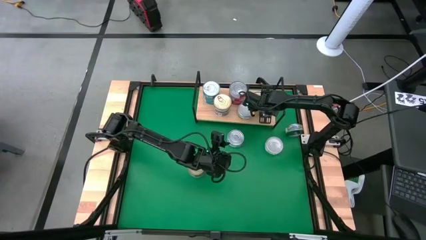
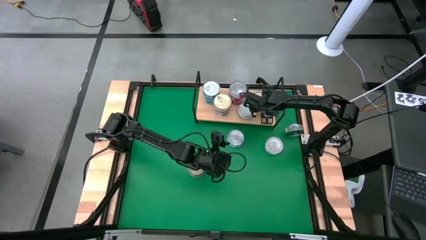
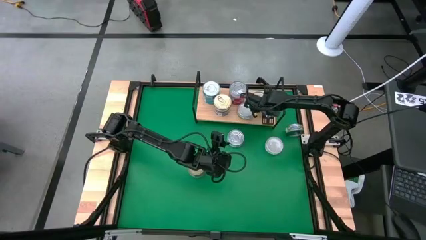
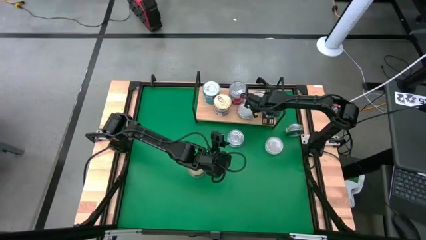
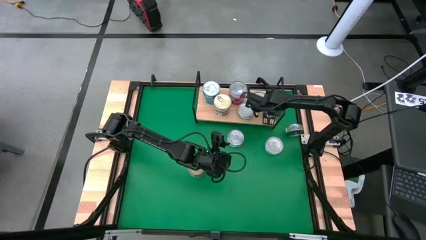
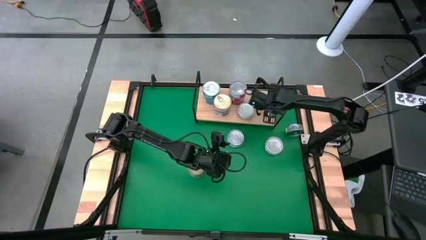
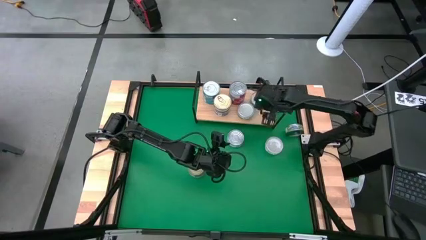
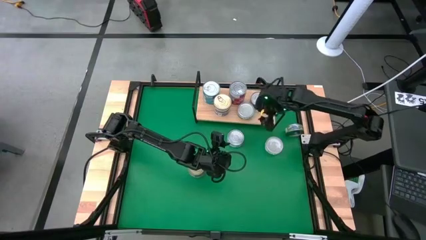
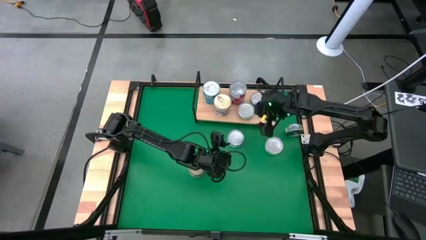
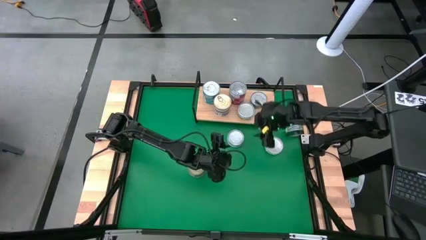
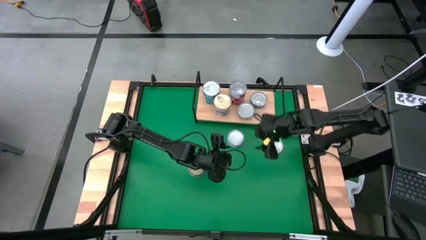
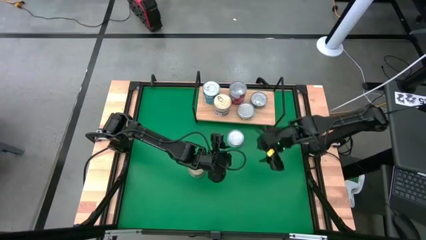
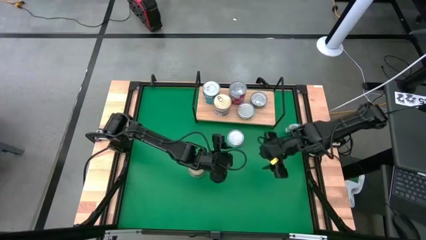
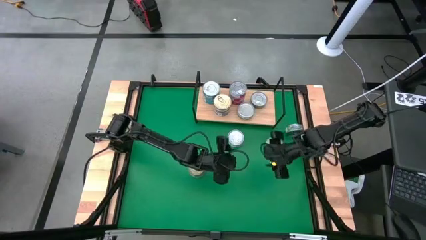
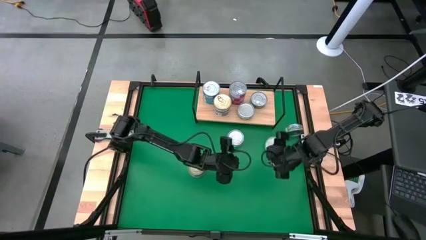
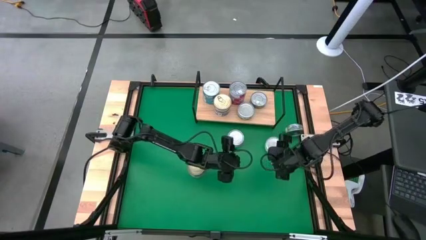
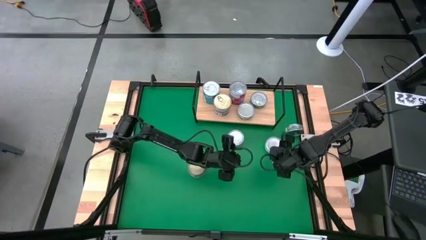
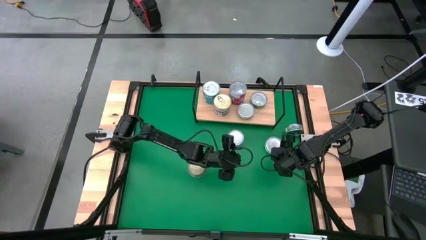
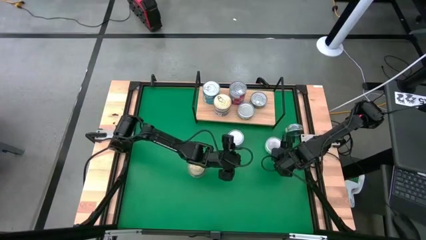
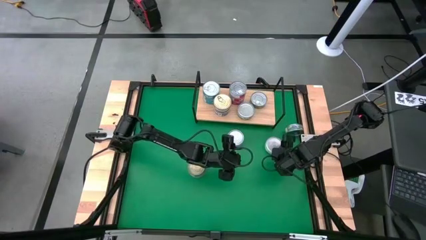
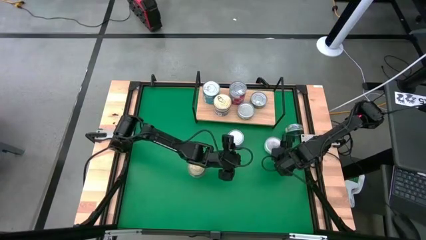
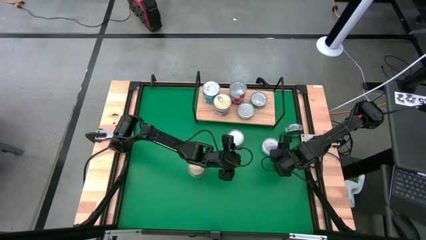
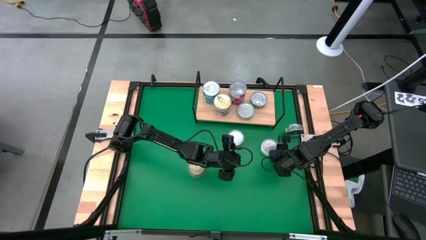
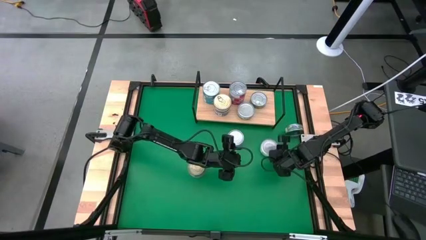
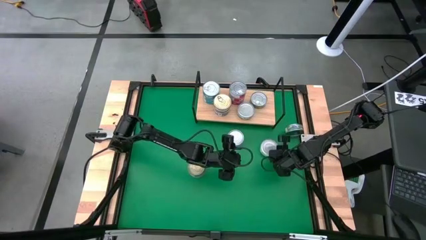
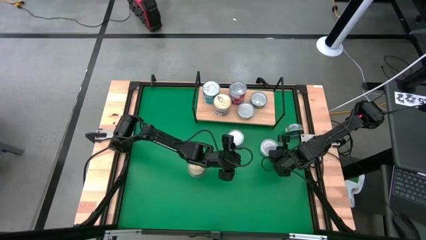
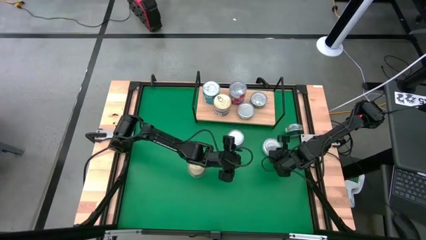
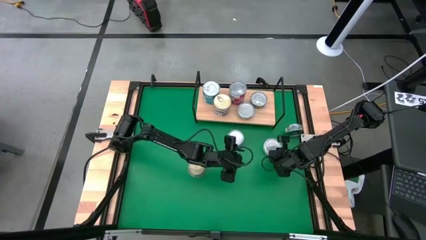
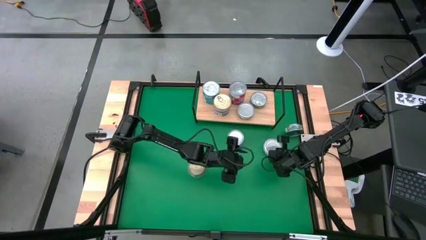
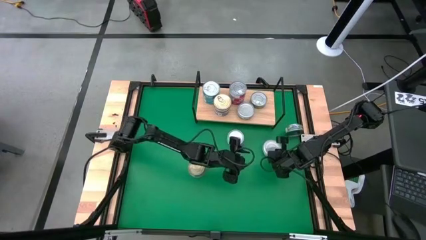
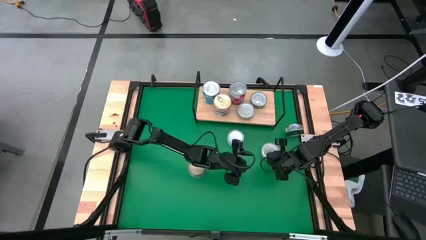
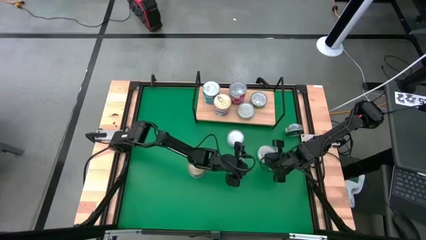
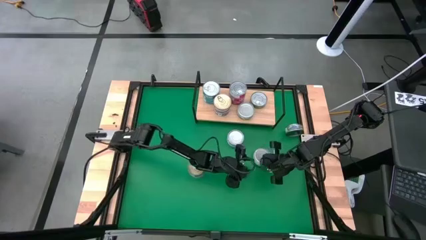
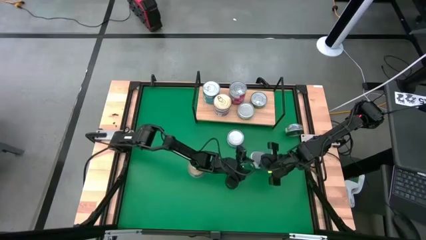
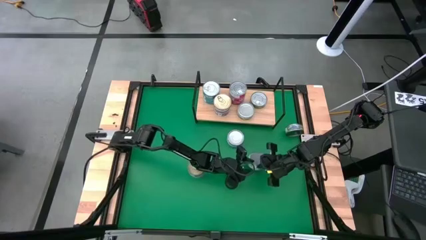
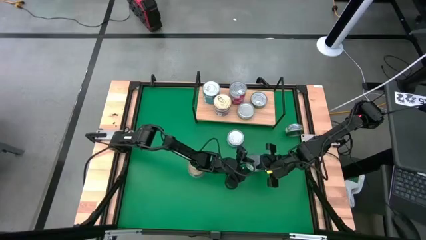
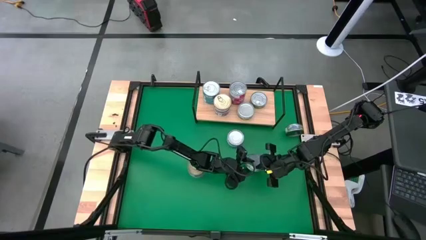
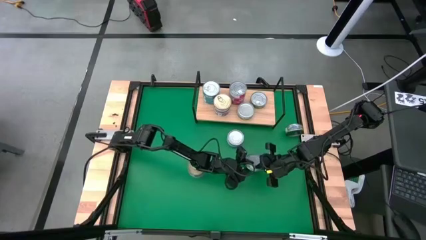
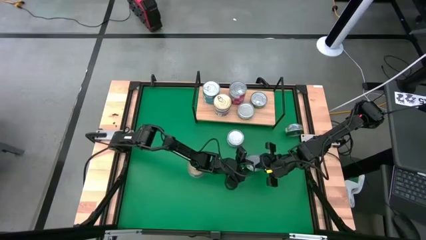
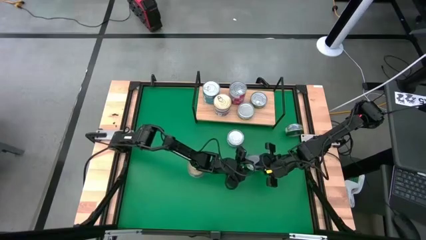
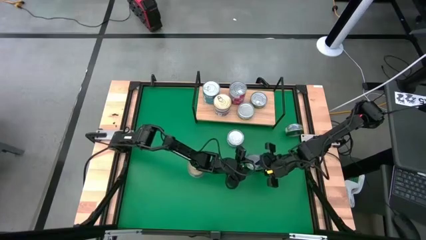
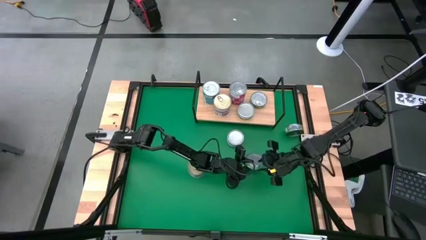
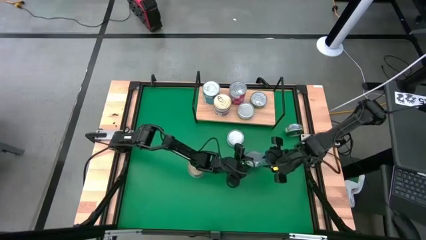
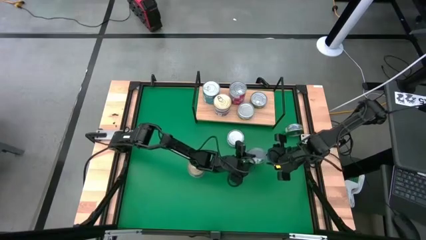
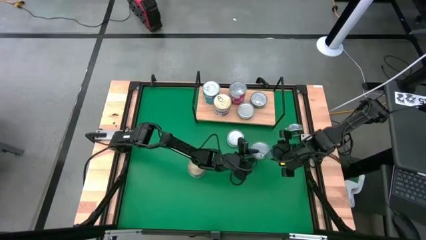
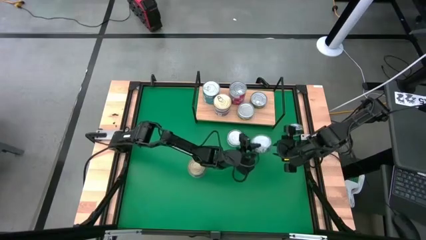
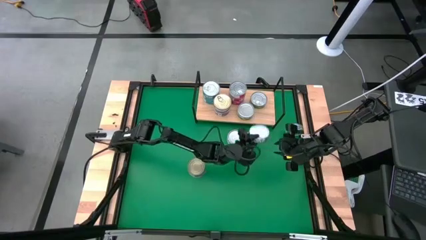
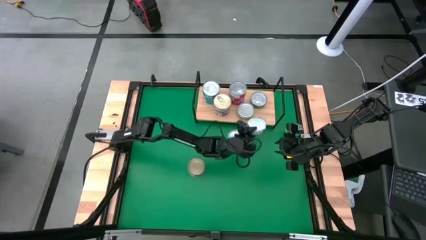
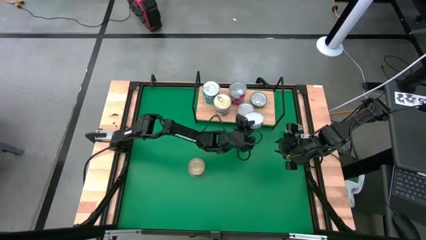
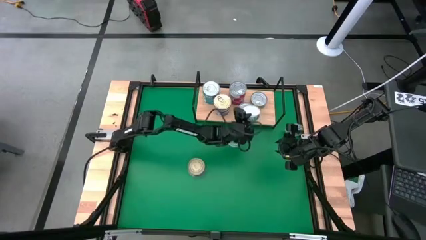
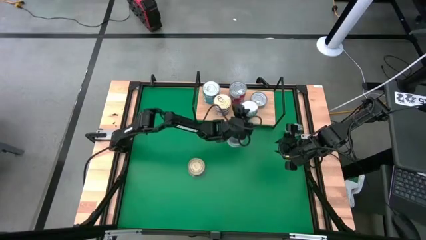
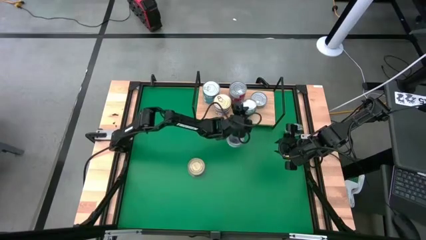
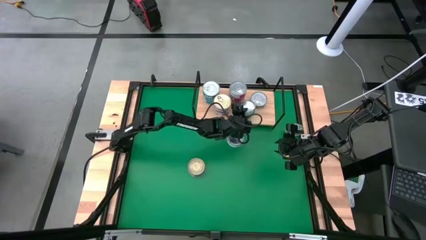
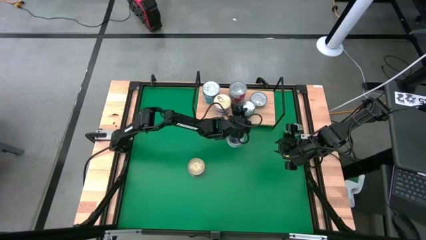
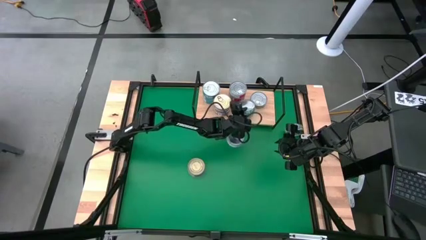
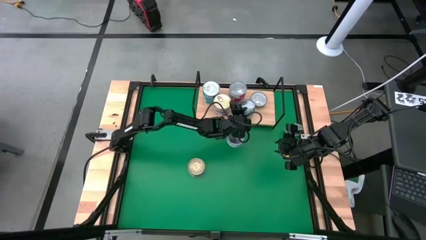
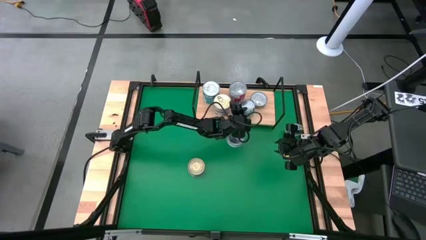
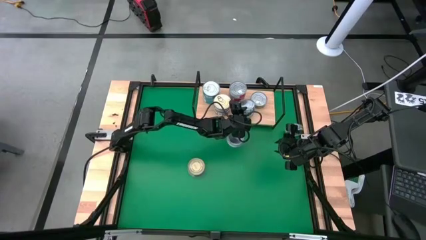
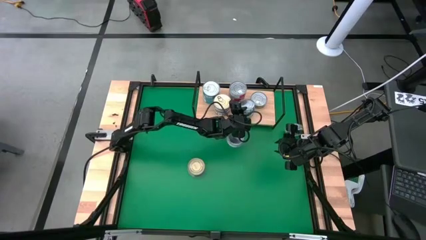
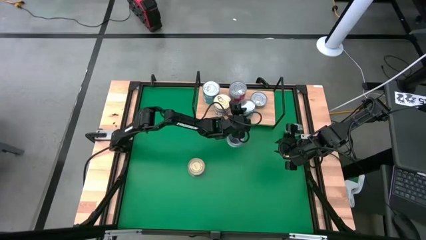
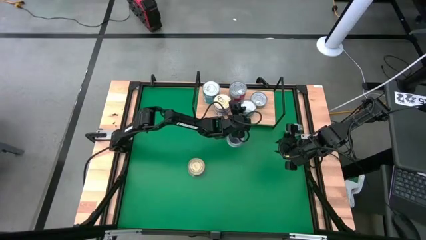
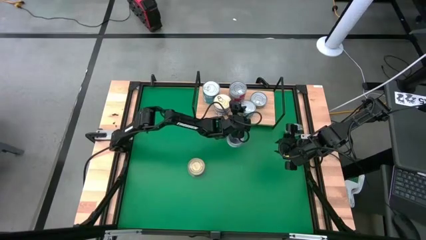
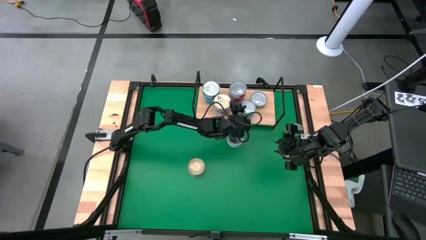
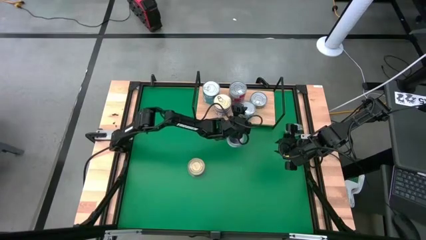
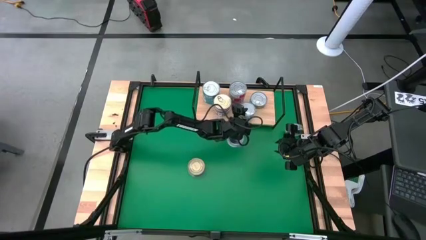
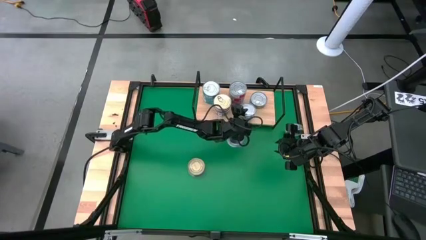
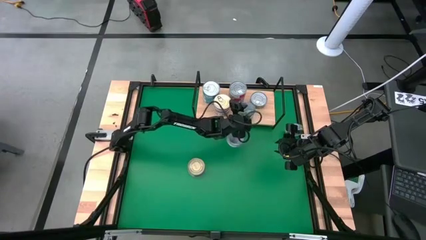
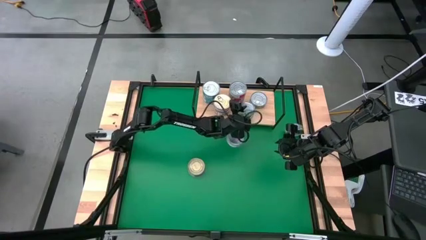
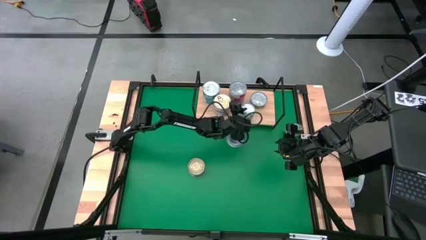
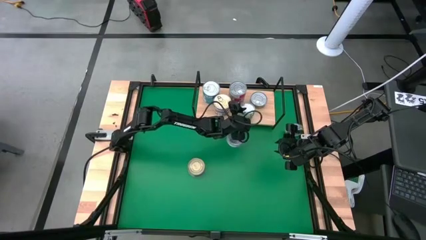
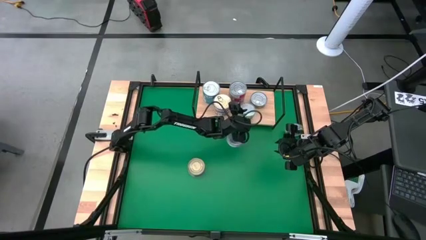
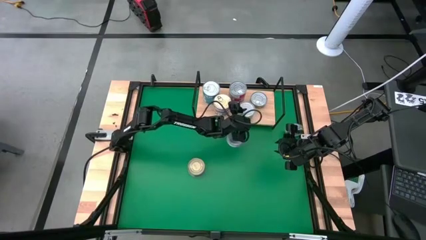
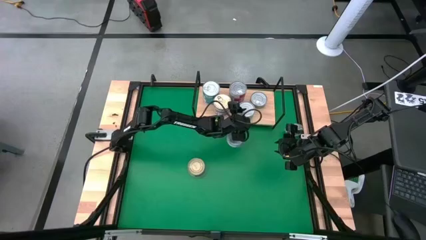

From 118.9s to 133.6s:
Task: Stack canned seafood by type on shelf
Stack the green white tuna can on top of the green white tuna can on the shelf

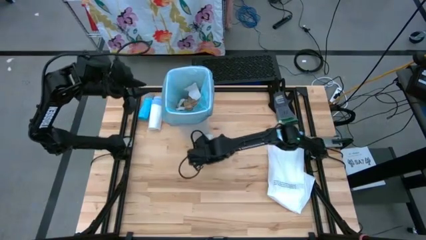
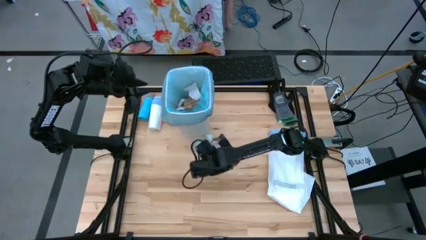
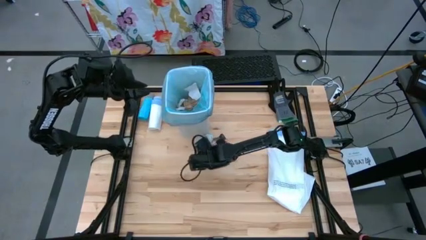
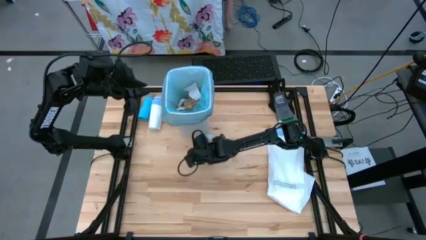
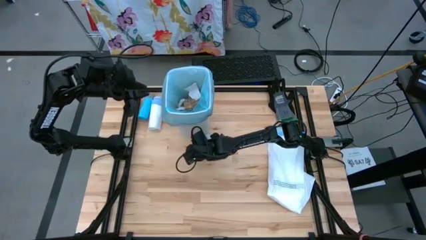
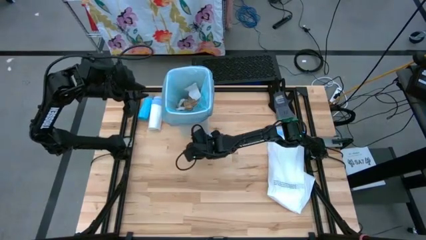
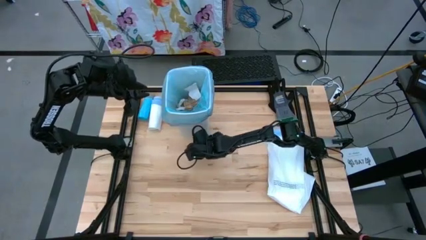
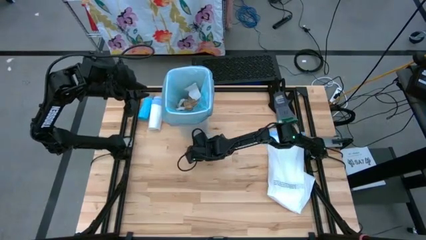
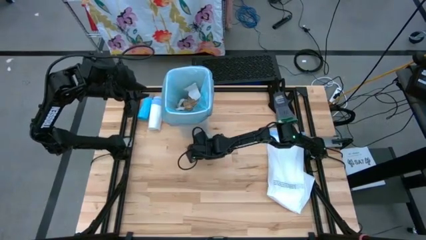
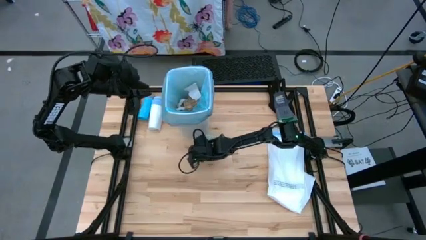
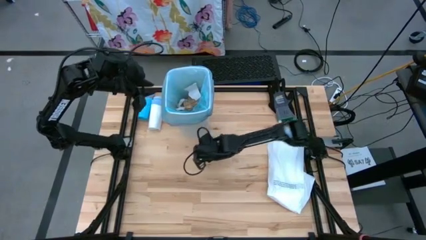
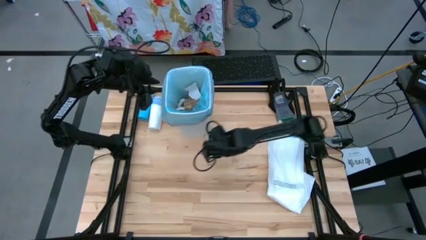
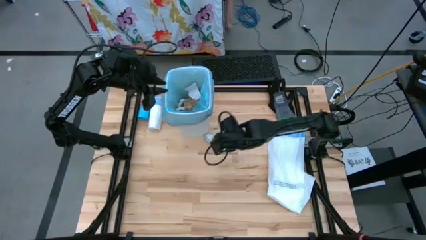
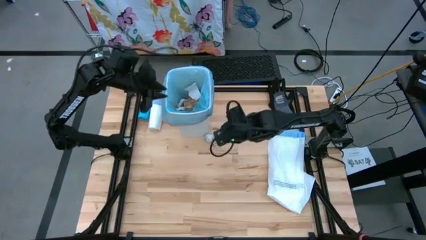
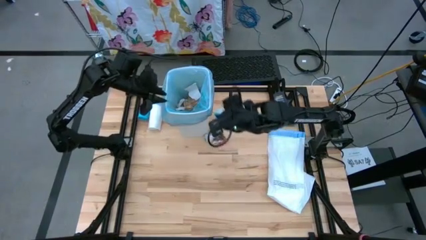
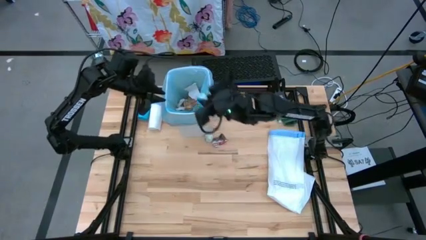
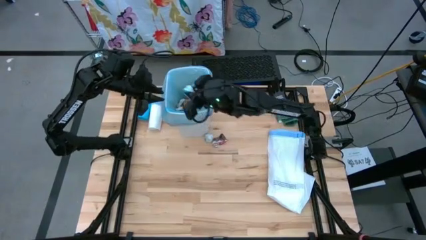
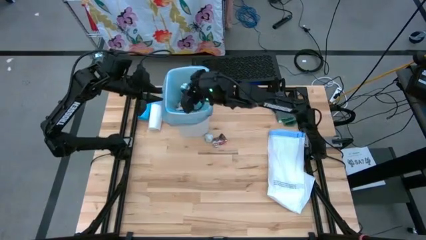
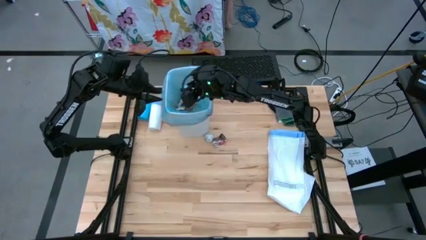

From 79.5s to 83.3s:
Task: place trash/remove bag and relplace
Put the blue trash bag into the white trash bin
